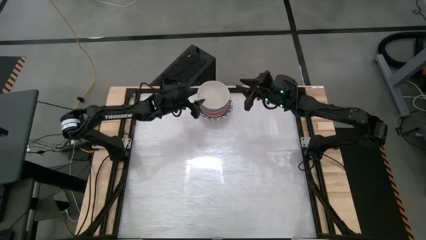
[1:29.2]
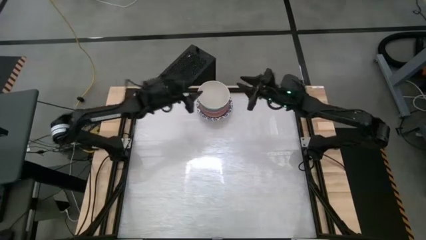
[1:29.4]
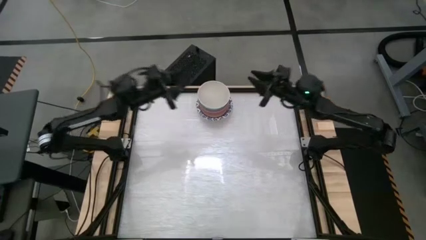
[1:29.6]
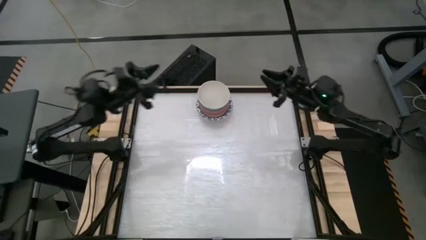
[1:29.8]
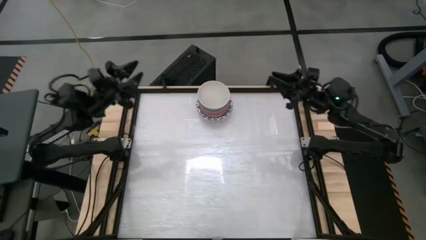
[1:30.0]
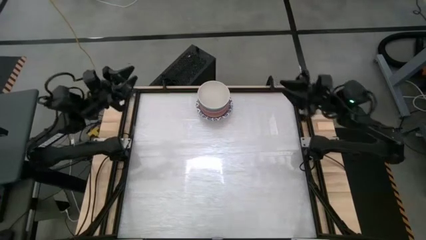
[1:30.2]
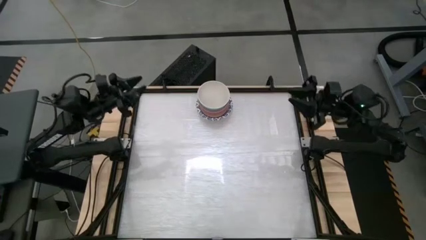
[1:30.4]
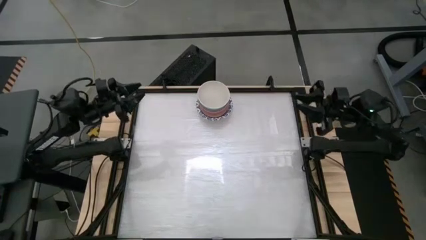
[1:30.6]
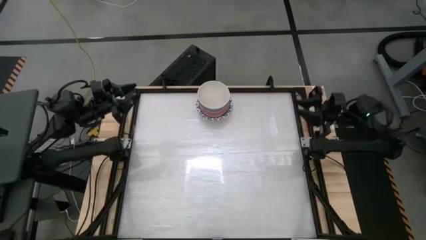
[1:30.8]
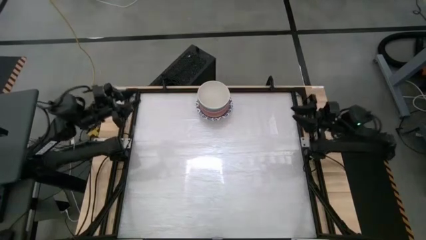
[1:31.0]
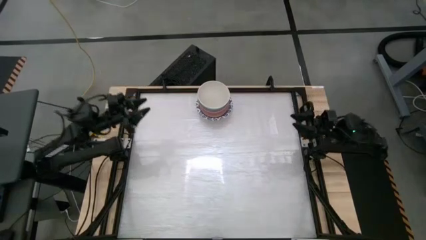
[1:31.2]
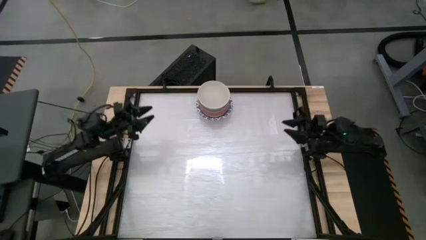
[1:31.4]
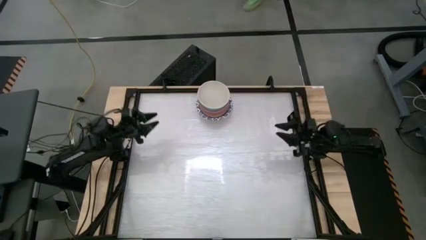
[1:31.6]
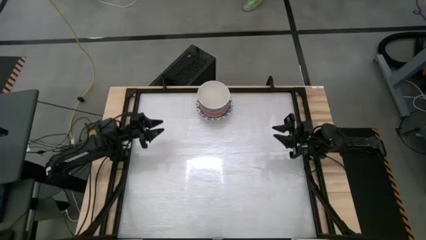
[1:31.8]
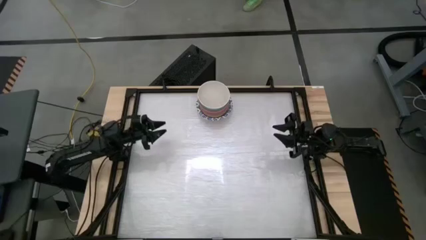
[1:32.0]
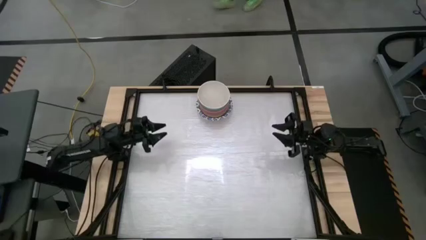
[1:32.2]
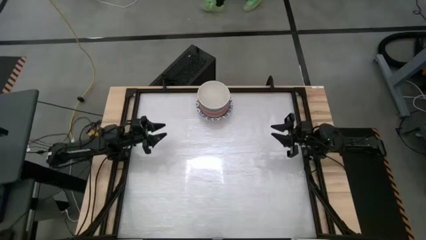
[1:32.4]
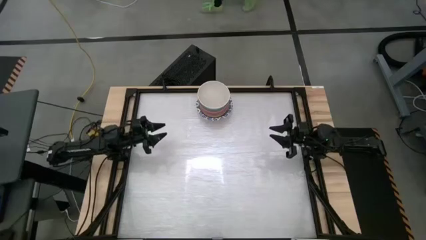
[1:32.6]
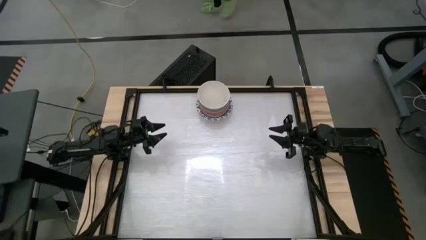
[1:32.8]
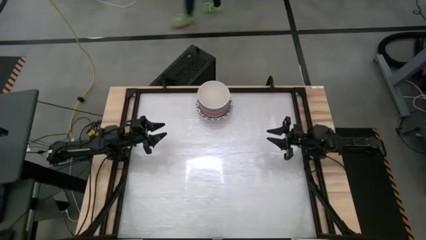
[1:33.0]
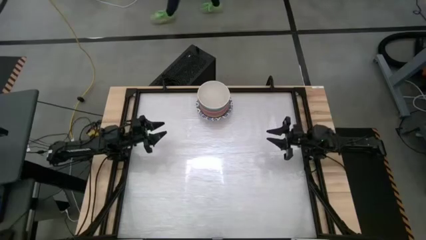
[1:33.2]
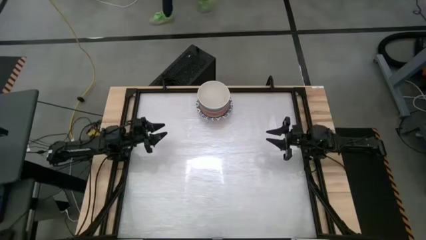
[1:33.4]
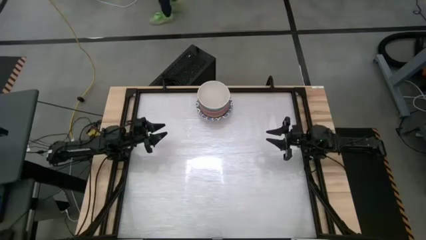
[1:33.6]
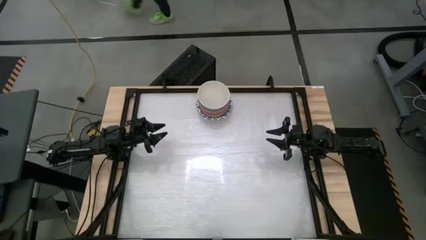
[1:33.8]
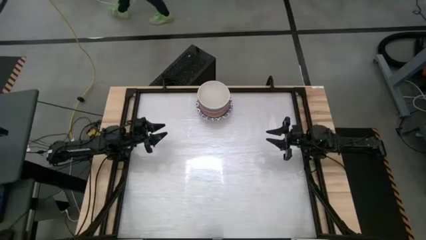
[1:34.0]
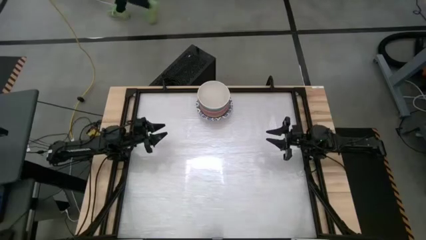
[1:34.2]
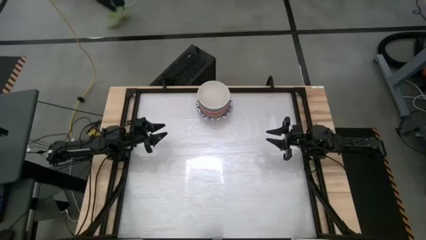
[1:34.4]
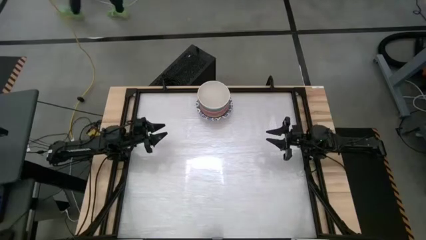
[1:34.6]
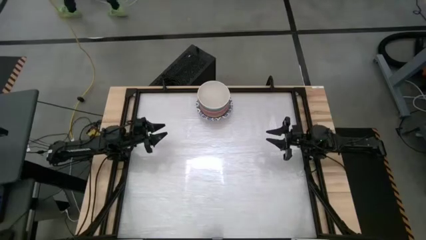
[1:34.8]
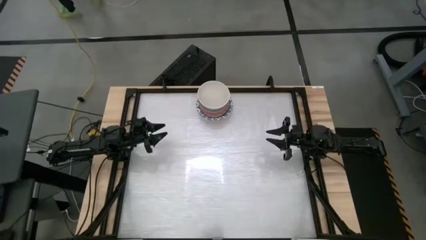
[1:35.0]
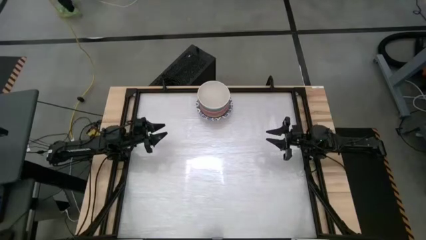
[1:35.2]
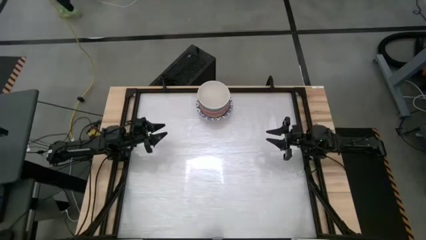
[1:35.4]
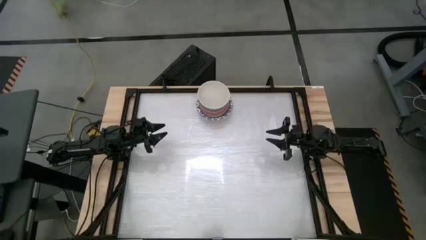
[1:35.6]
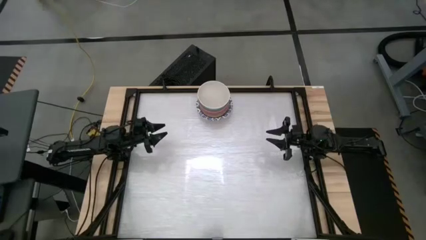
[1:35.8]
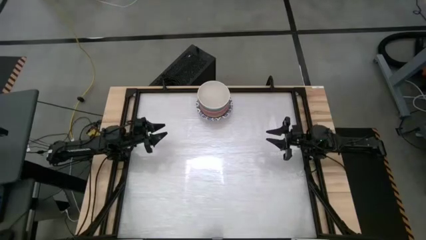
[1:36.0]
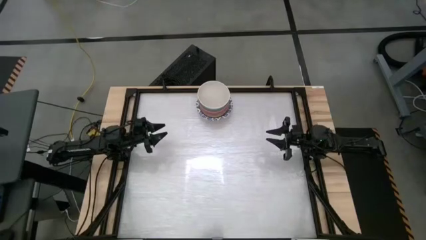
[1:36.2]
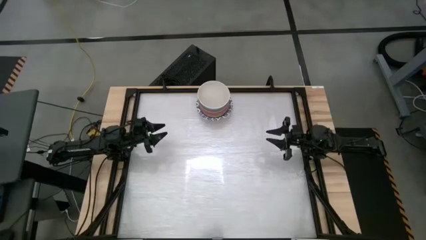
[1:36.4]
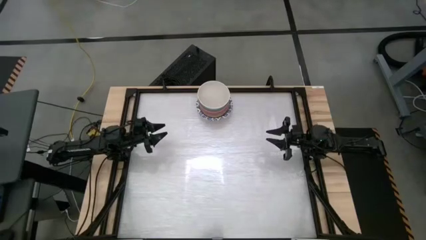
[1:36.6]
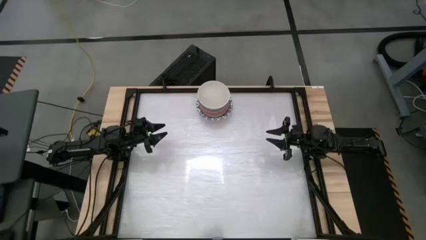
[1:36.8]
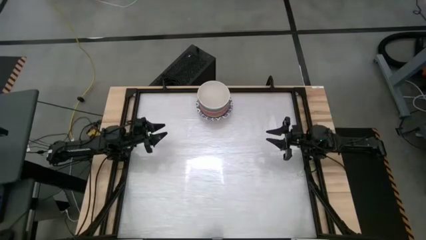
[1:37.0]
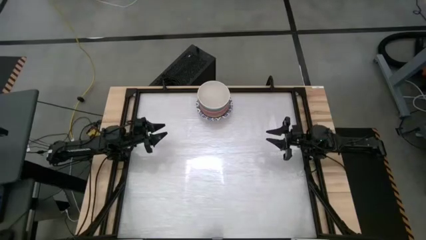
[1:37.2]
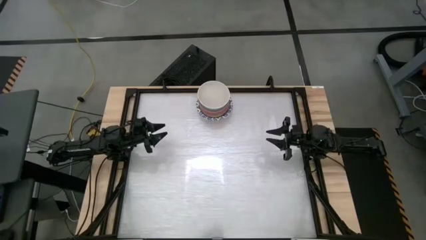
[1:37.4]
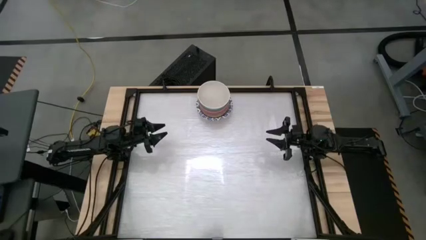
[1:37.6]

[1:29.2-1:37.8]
Task: Nest bowls inside each other by size order
Return to Home Position

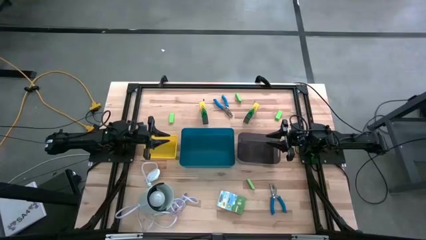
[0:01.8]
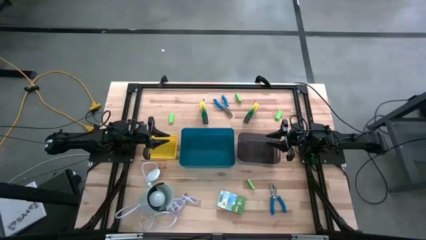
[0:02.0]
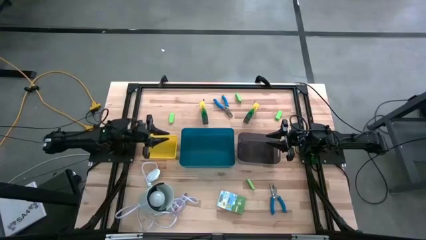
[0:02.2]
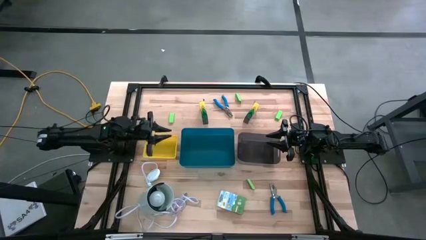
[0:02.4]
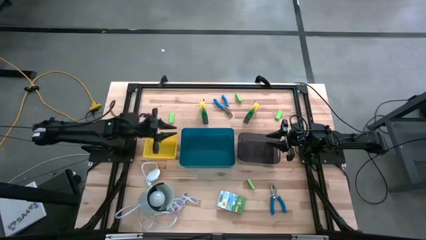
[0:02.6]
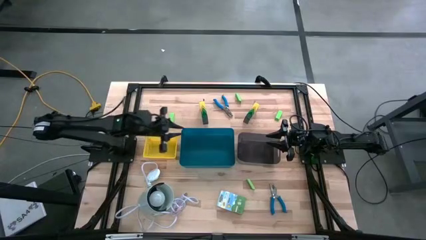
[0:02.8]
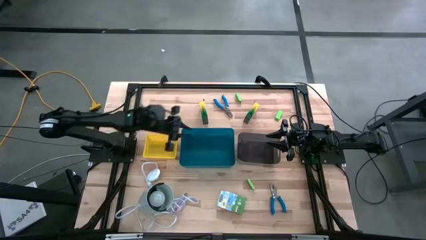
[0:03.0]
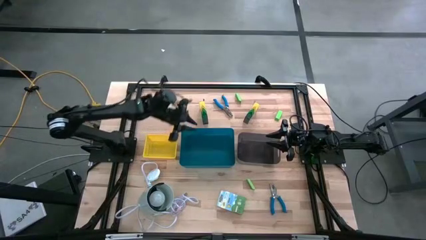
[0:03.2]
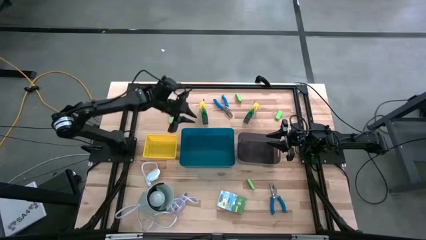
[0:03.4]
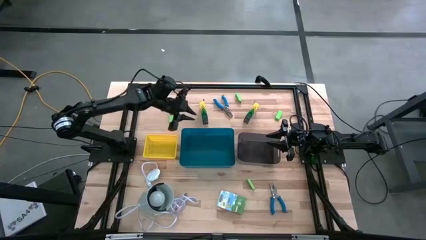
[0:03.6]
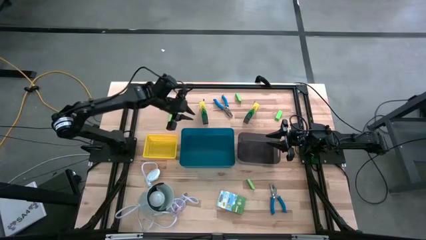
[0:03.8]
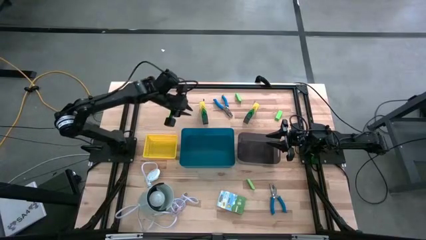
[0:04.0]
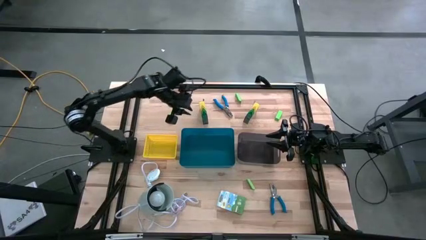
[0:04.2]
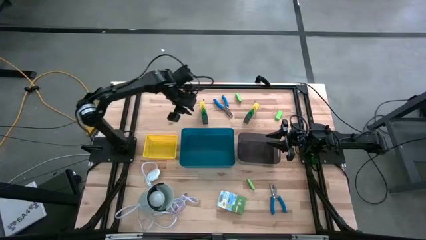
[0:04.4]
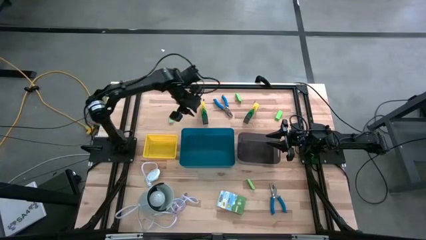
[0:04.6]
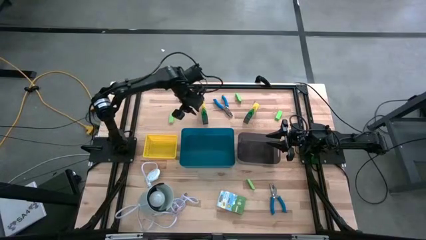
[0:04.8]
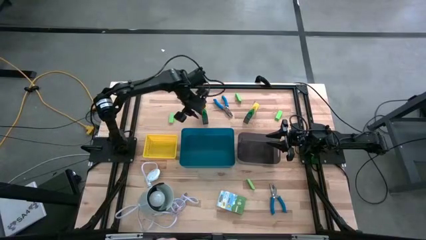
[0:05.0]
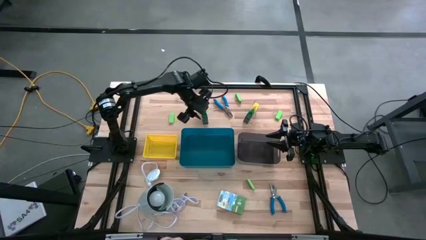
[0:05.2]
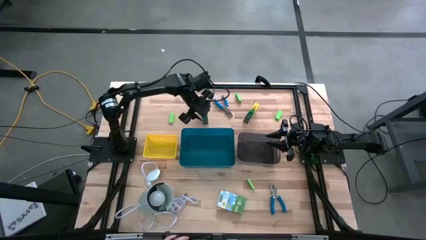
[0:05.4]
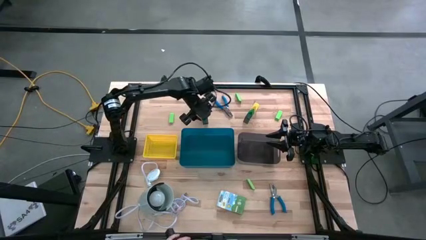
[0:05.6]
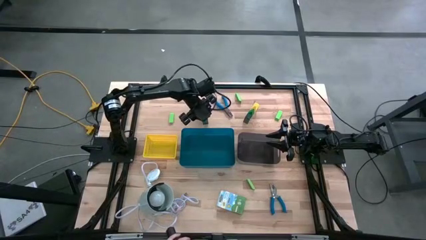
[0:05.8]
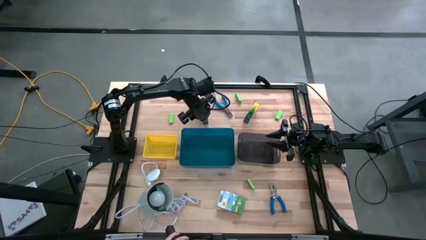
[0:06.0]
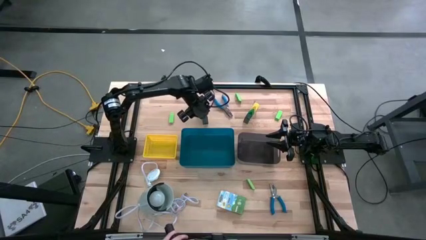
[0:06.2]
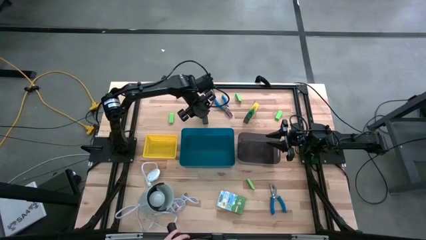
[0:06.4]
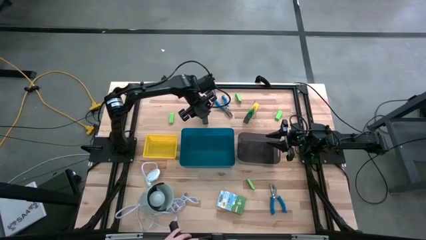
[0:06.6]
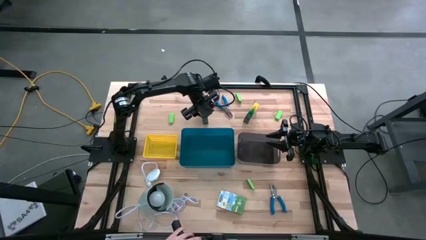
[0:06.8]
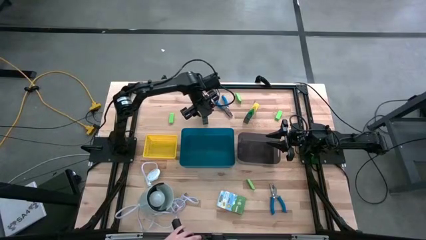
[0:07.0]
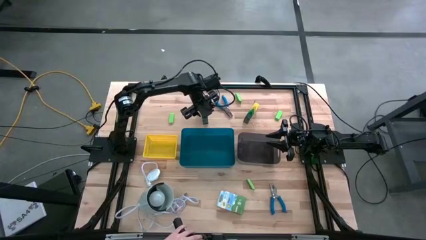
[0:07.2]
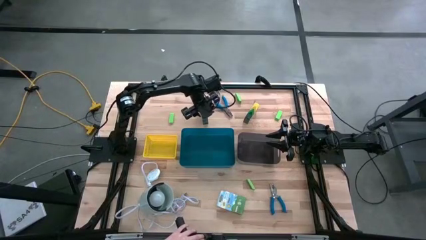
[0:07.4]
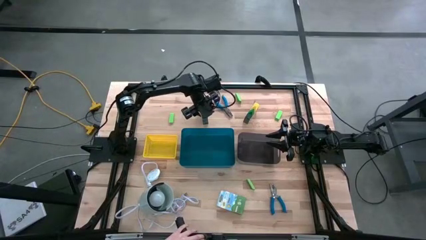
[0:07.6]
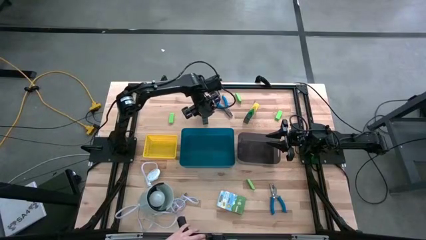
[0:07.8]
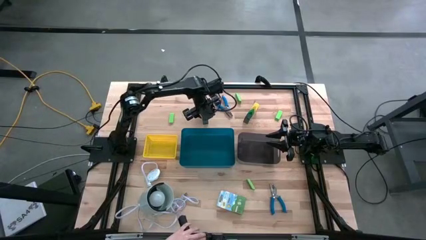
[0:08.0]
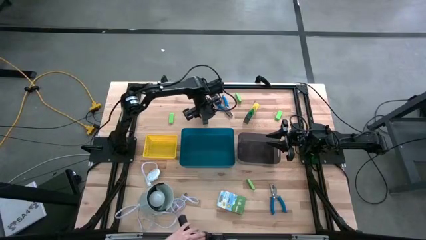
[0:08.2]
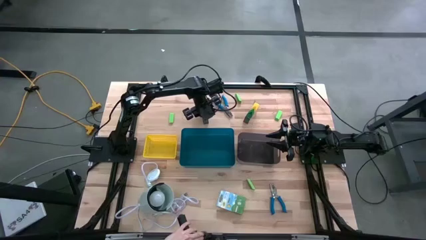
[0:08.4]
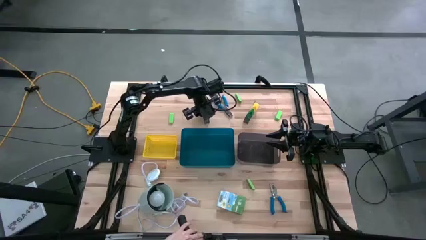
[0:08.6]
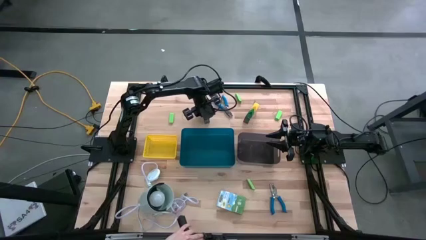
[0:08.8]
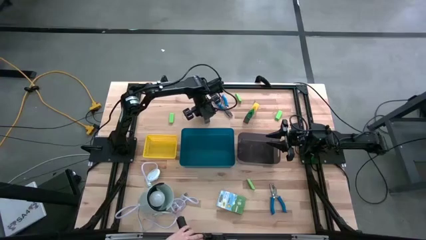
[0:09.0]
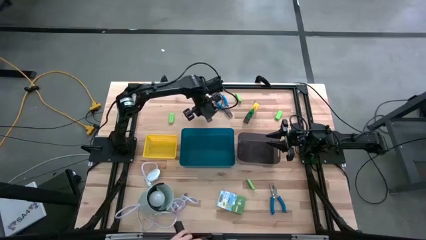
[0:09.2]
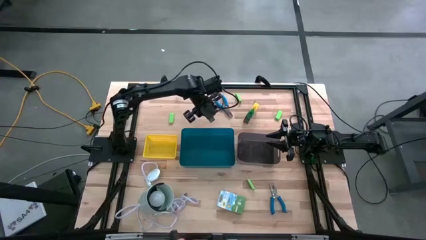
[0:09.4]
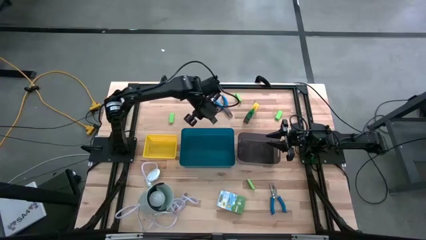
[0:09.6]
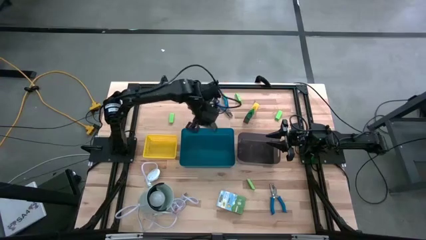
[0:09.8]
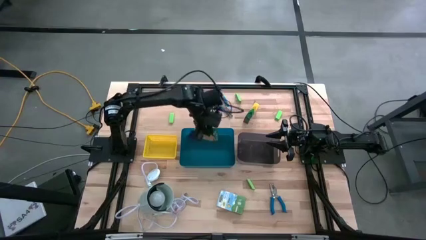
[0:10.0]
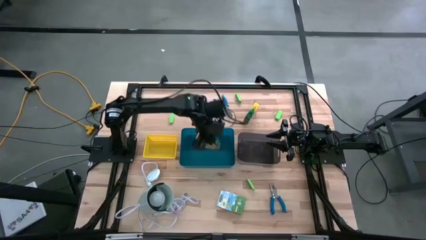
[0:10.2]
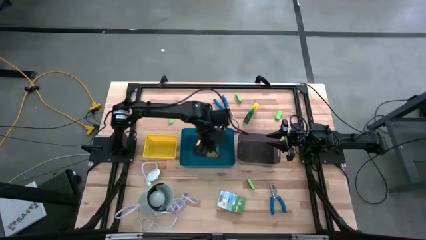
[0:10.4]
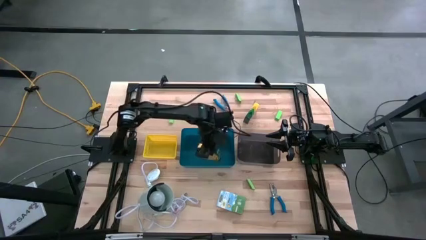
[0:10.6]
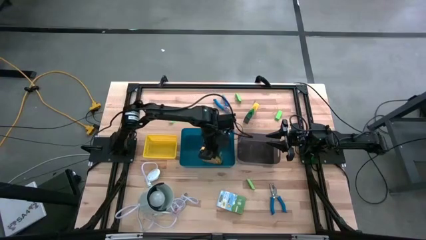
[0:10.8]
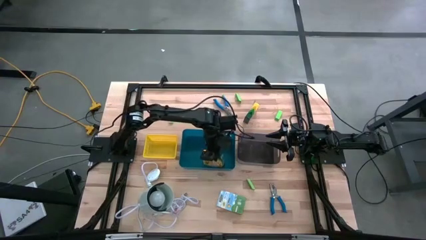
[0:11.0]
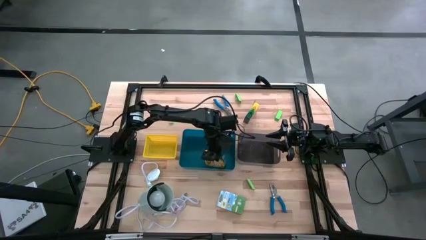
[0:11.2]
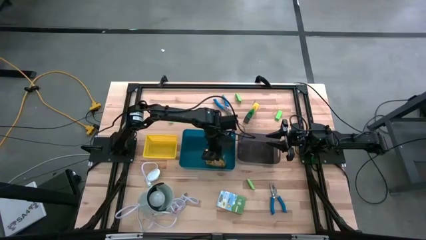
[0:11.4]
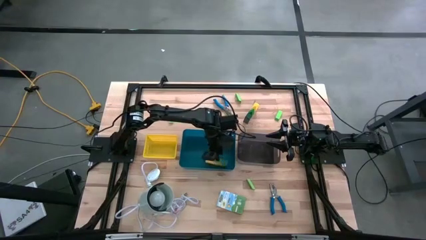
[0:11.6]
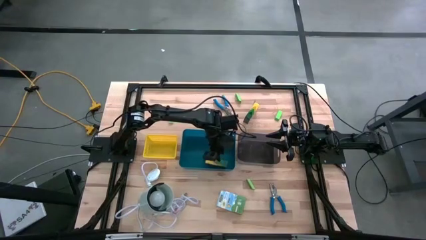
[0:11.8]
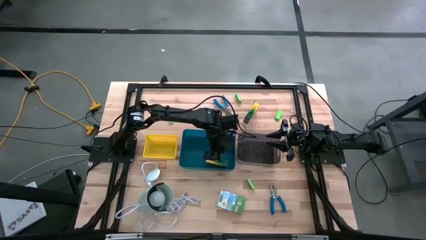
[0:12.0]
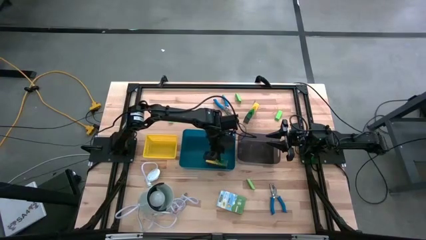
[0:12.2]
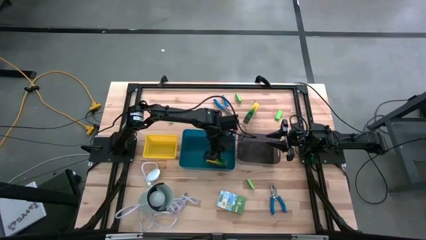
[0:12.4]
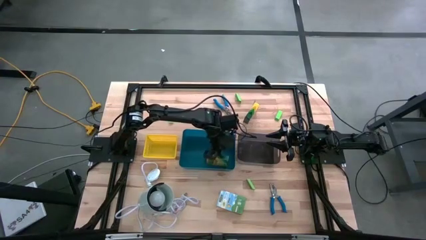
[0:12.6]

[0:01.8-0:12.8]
Task: Pick & Place School Supplies
Put the yellow box of crayons into the blue bin
